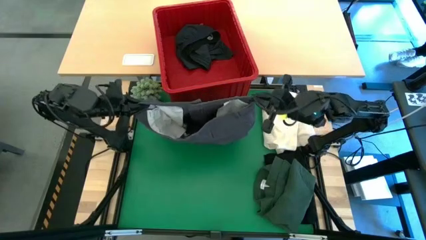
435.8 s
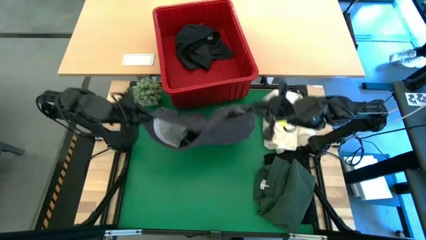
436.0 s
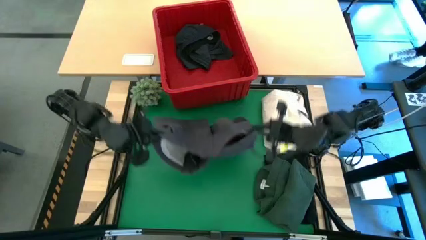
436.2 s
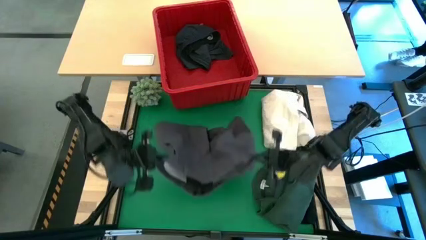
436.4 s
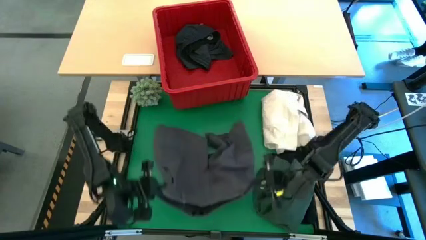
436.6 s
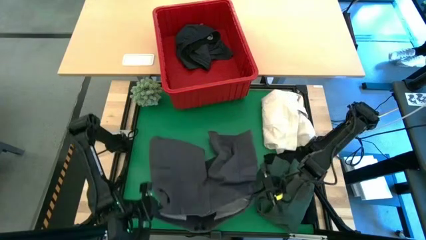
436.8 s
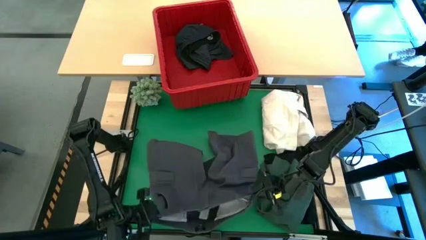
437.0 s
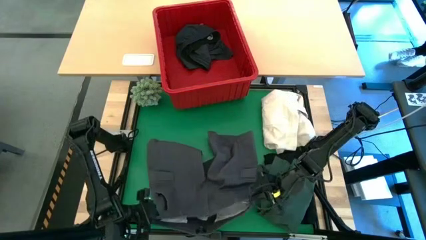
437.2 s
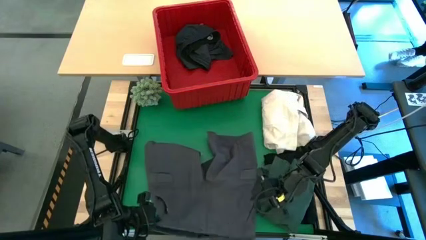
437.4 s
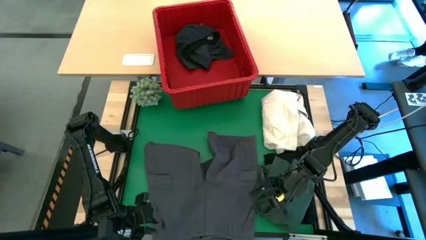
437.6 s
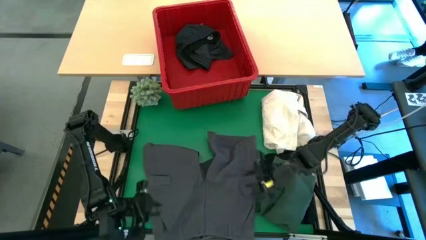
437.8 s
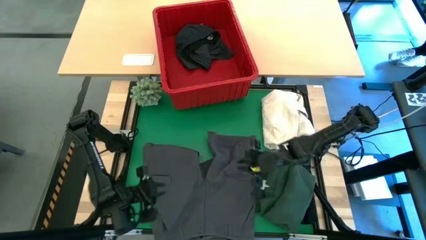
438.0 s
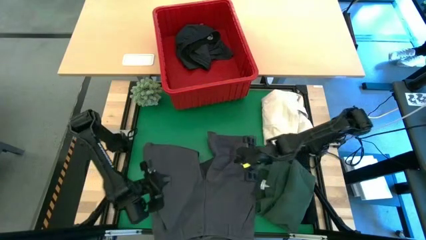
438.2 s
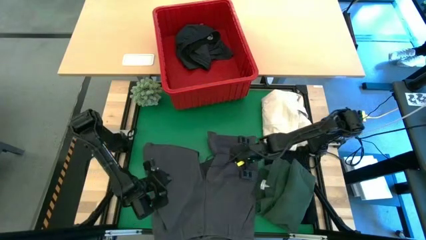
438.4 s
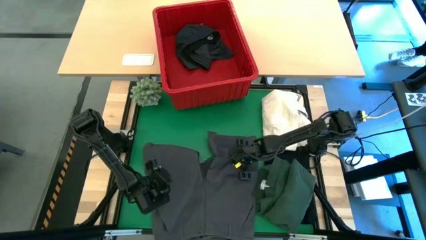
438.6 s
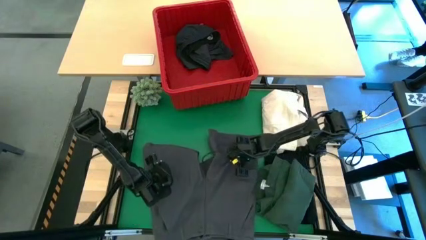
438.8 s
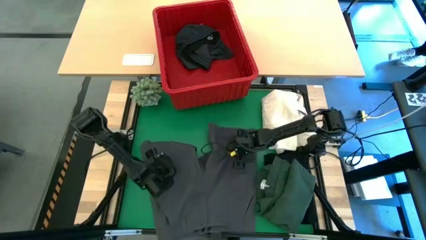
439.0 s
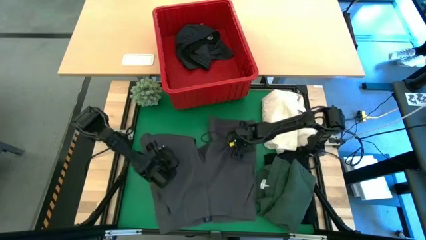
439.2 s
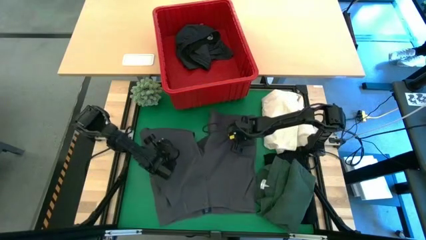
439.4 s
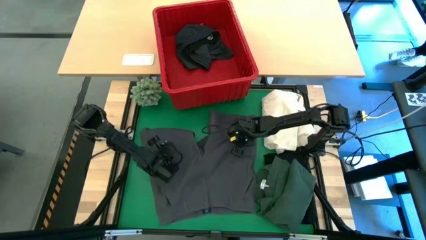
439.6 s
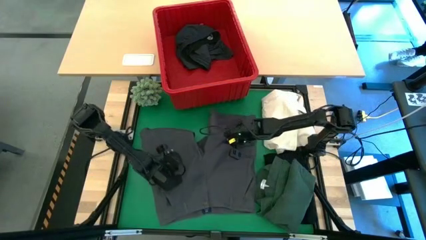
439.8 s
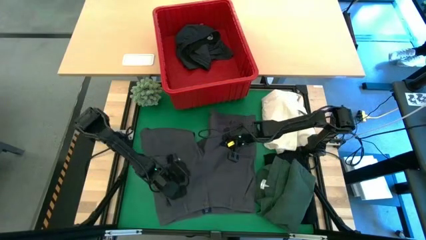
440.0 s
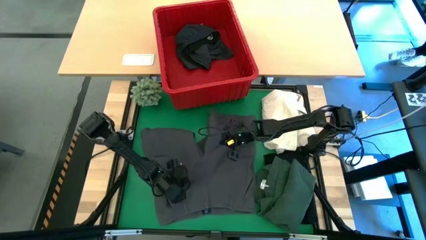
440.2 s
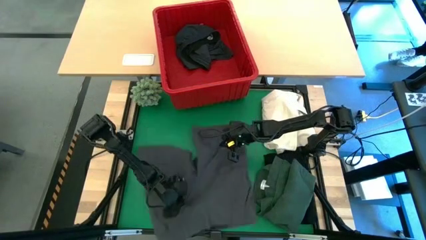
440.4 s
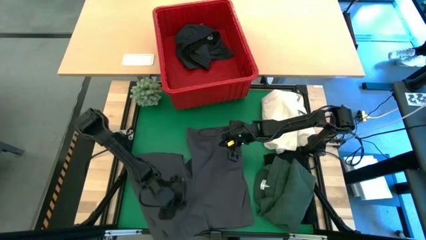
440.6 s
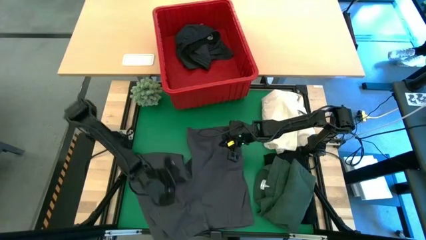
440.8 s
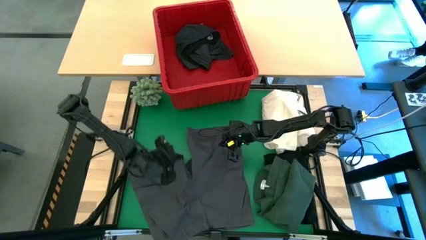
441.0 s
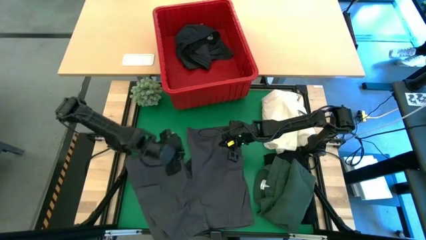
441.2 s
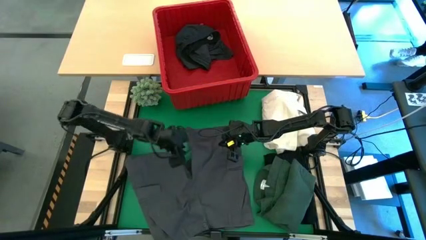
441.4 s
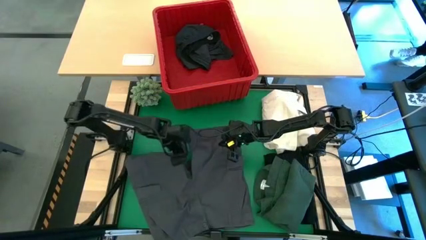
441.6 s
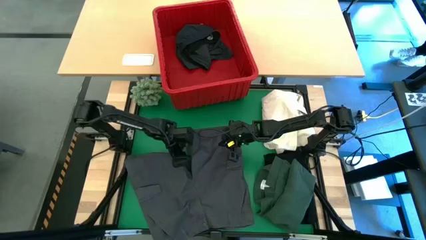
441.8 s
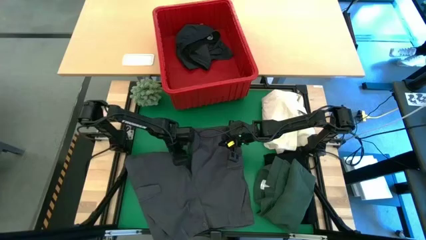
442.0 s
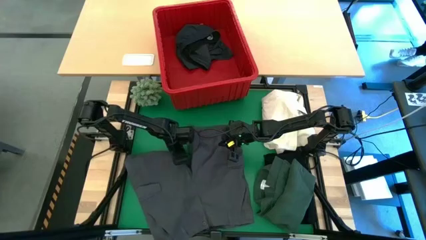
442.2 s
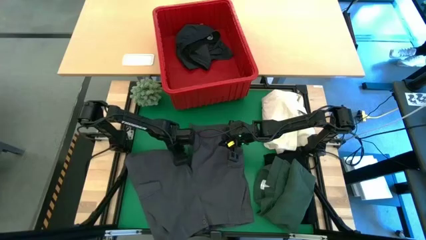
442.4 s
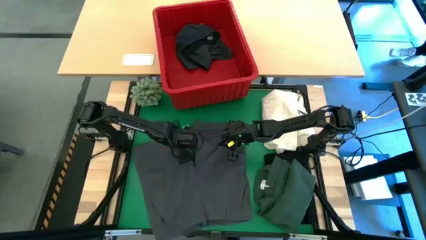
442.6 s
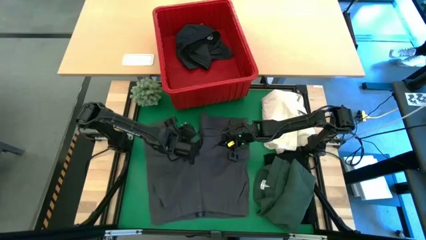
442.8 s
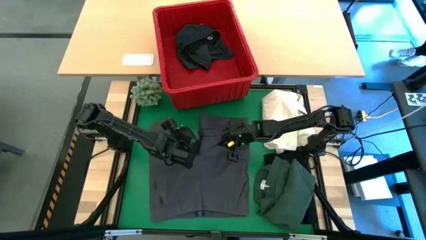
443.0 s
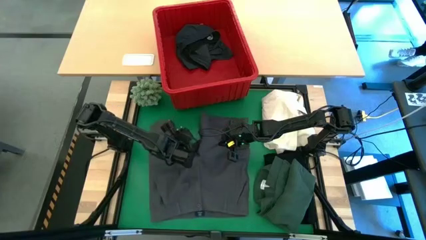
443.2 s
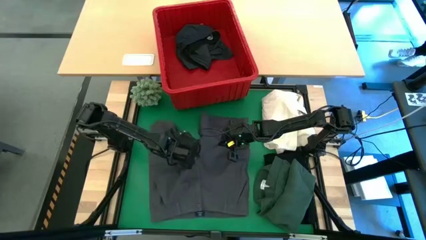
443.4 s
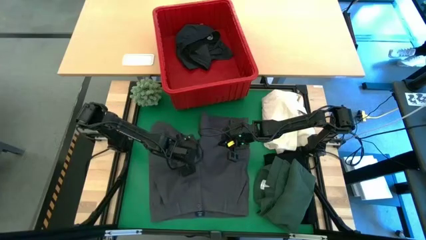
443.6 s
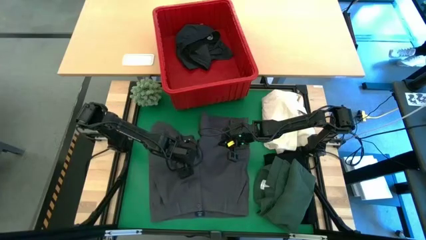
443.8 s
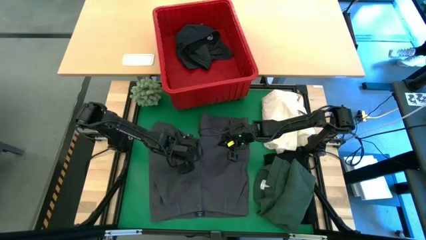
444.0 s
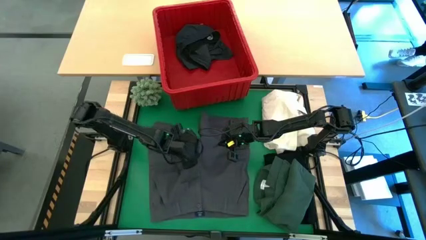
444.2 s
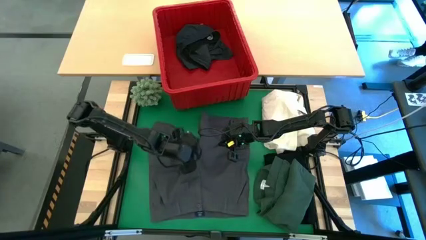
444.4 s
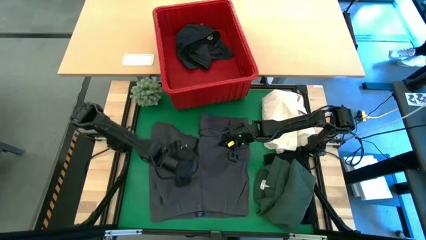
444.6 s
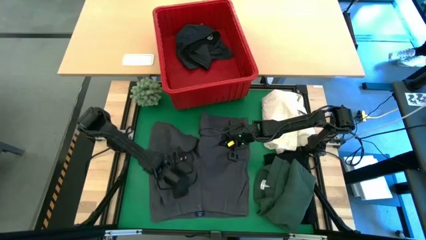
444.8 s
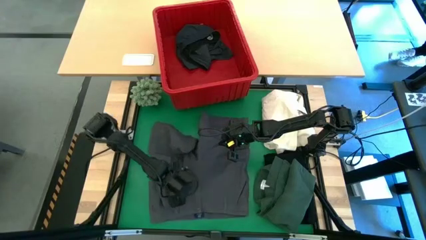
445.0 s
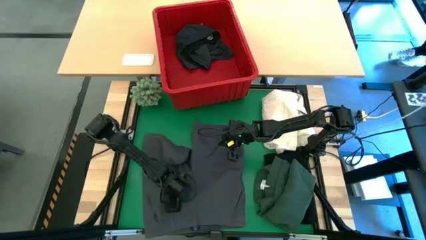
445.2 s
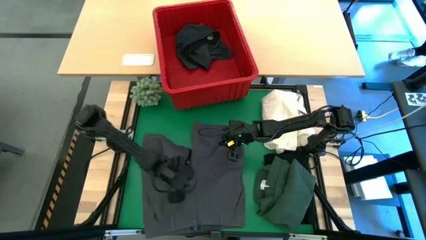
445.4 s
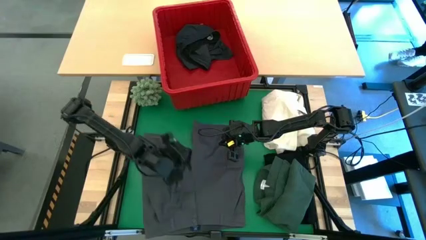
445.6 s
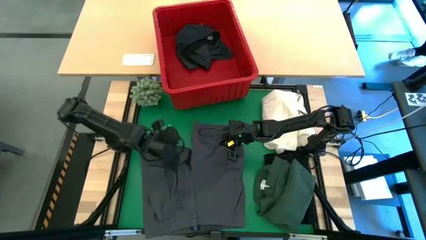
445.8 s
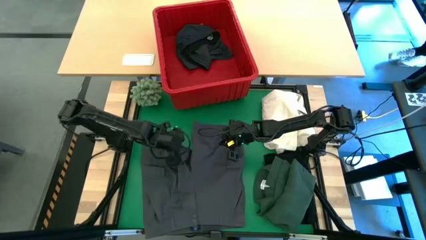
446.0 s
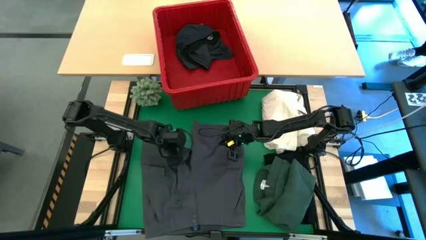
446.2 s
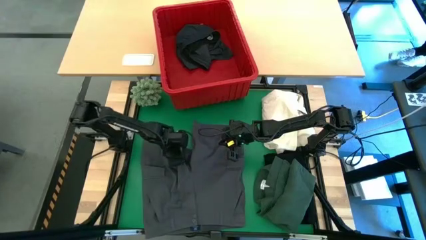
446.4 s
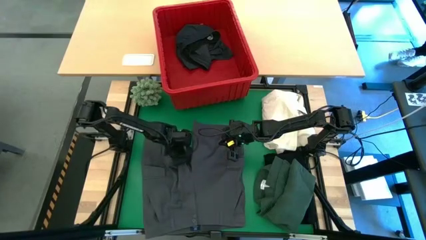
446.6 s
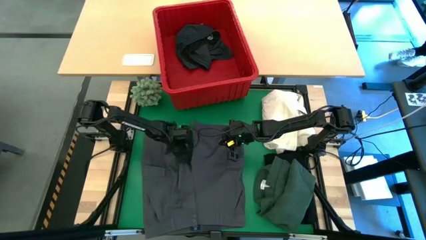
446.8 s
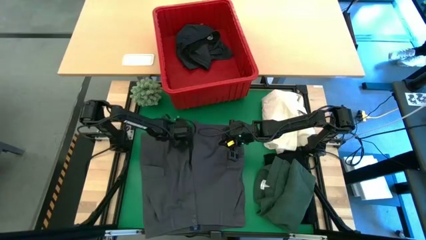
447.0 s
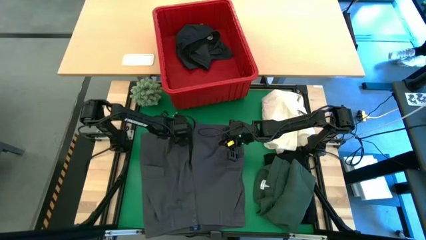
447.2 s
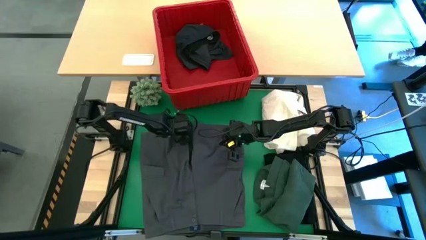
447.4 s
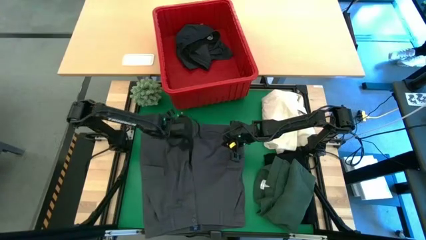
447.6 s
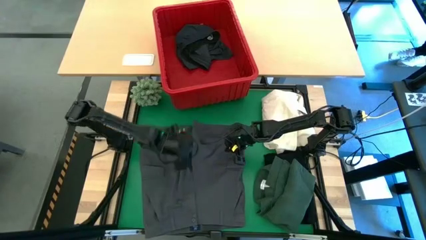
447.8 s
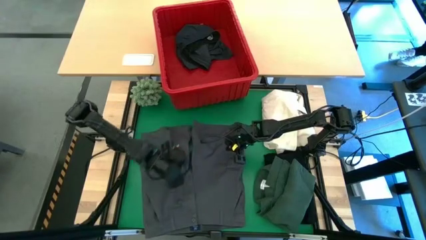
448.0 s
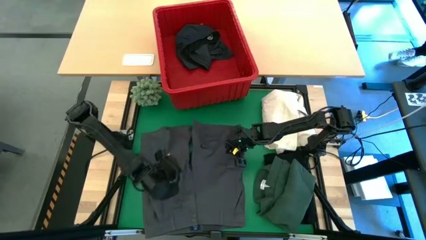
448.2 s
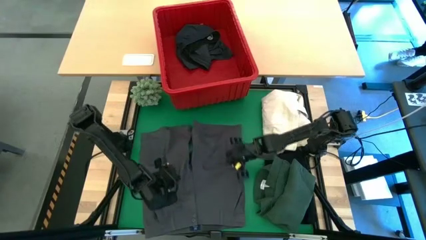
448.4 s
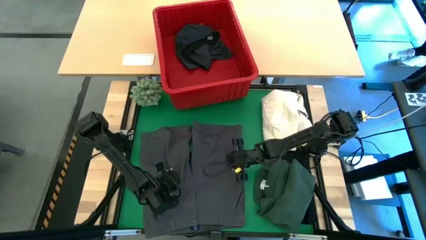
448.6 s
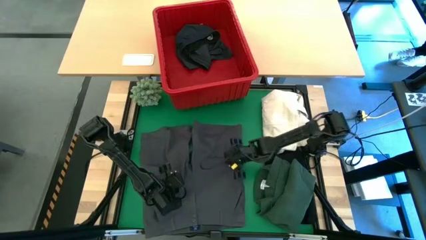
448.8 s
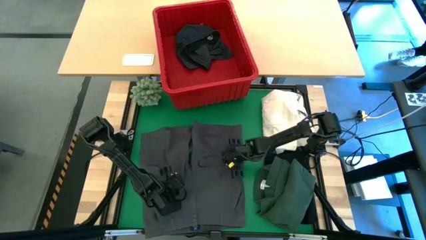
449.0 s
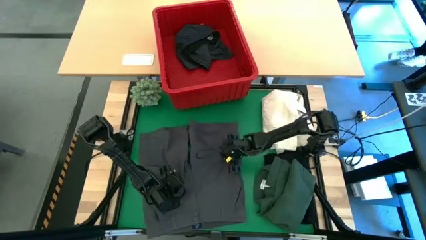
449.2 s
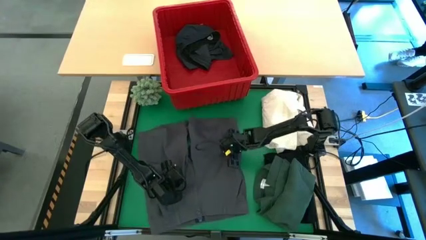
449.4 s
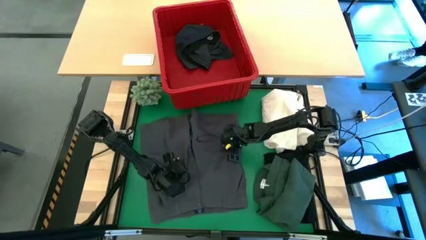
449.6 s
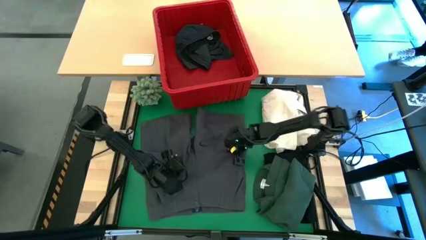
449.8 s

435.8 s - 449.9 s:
Task: Fold laundry
Fold the gray pants

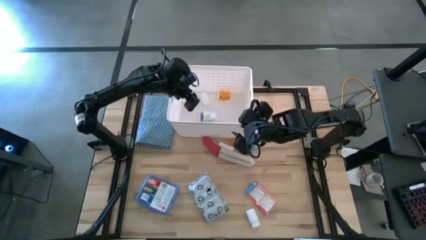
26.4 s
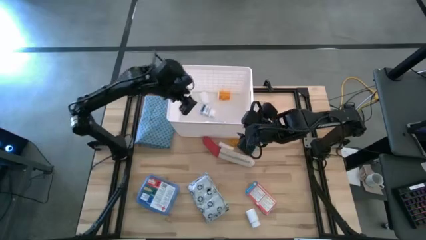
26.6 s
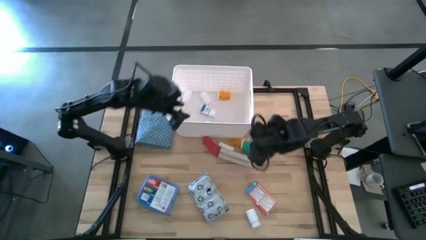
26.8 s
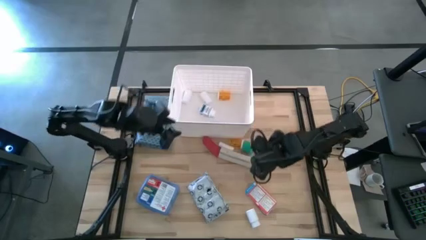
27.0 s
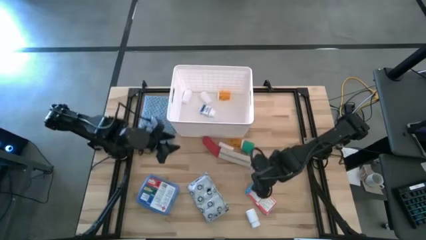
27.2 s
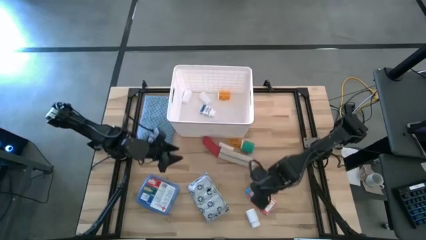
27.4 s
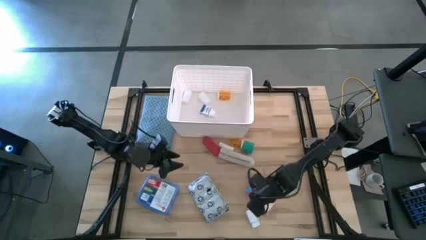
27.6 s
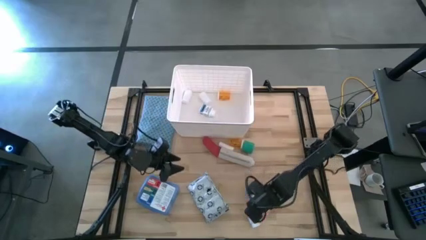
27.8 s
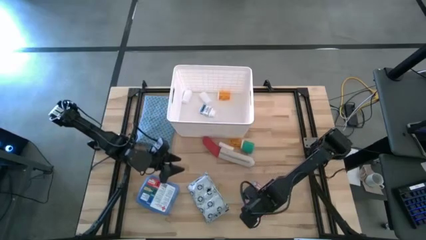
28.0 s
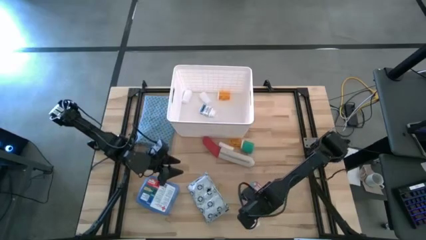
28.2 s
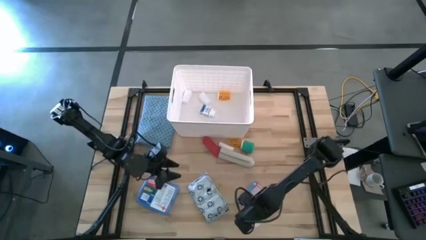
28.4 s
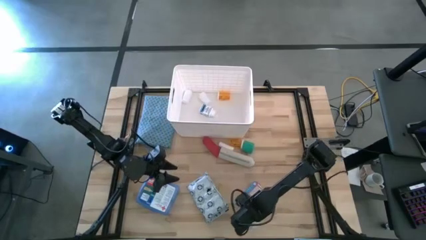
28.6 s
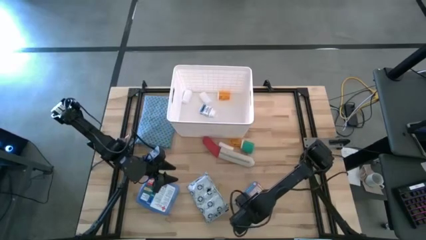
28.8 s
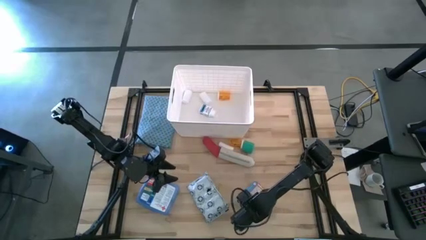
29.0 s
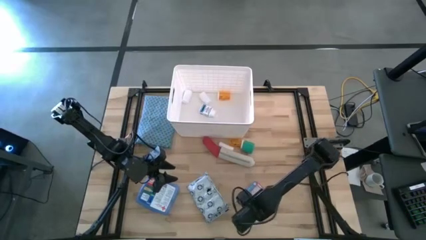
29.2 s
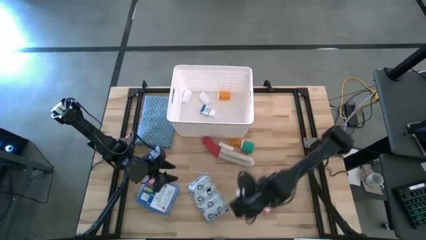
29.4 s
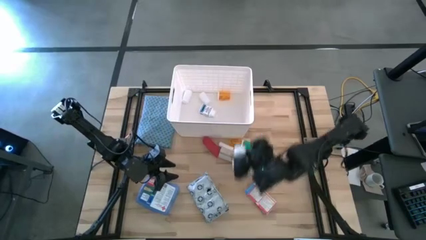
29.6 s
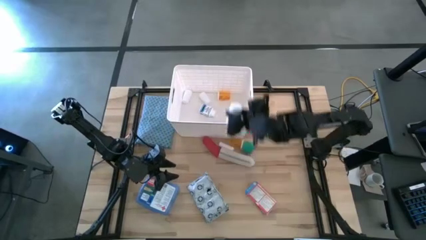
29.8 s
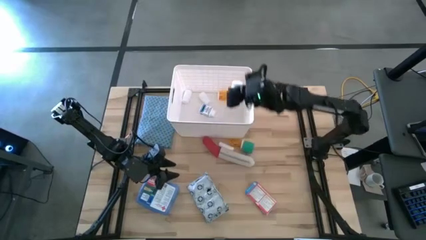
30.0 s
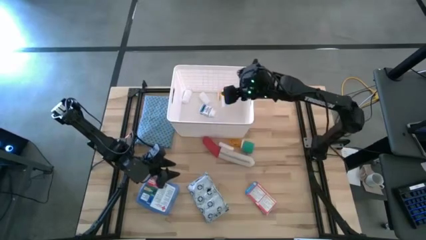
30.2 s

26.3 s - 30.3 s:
Task: Pick & place medical supplies in basket/bin
Put the white medicine bottle in the white bin
